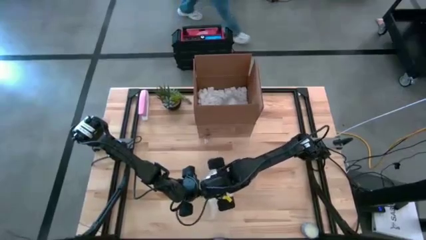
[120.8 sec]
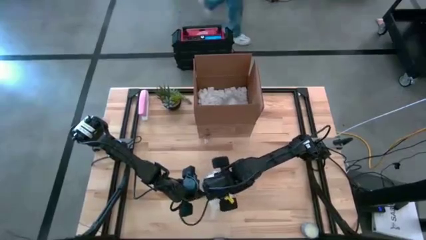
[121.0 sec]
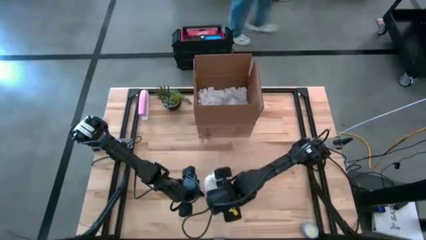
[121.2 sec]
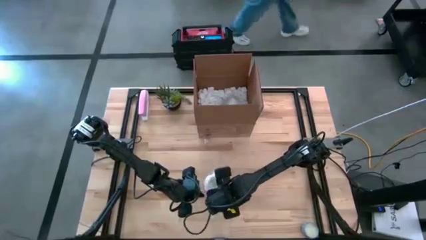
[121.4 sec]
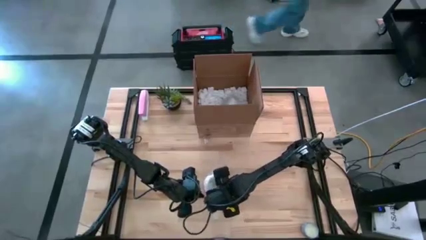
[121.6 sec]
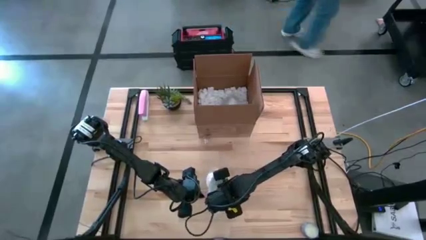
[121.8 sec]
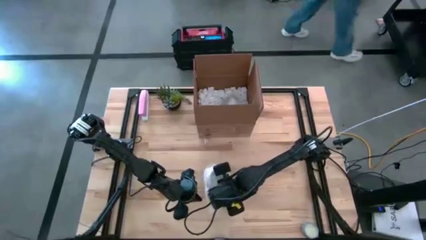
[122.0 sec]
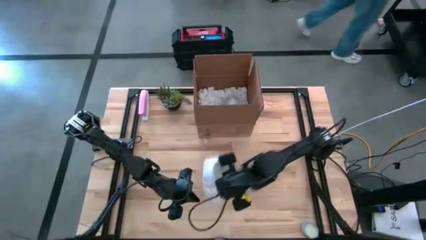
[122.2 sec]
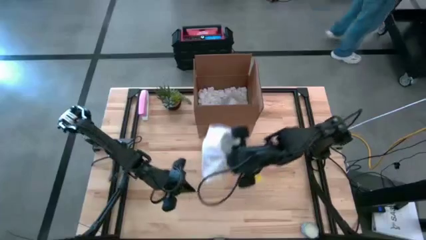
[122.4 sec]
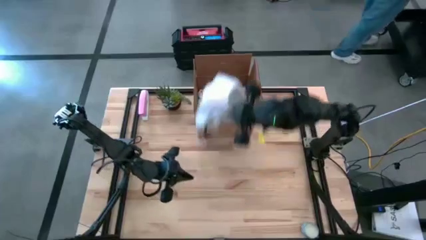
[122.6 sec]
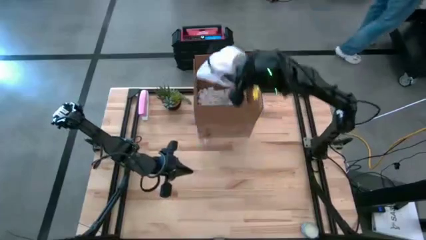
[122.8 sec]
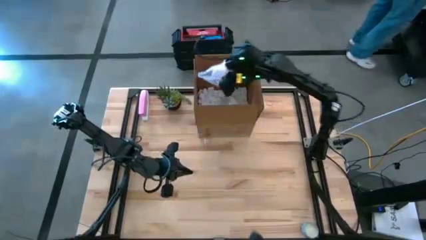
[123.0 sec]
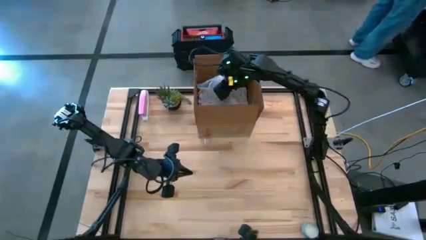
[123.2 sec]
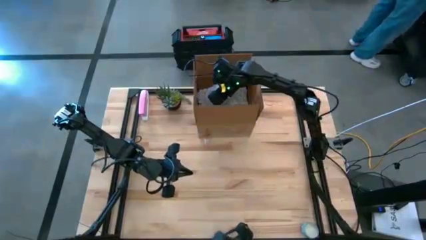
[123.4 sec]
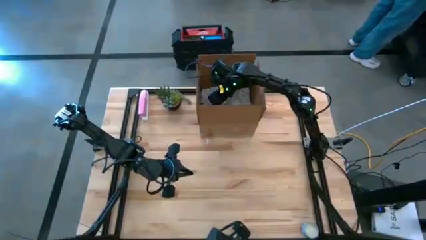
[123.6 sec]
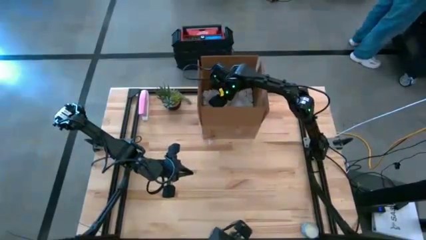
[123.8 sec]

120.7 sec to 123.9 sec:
Task: wrap mug
Put the wrapped yellow mug into the box

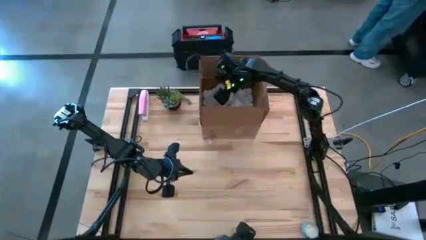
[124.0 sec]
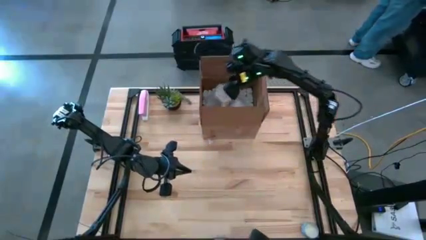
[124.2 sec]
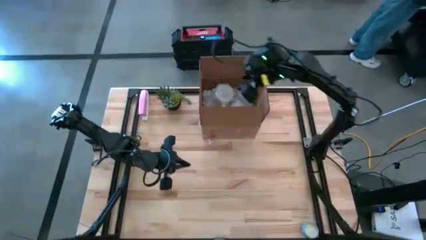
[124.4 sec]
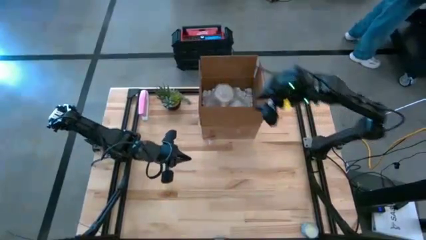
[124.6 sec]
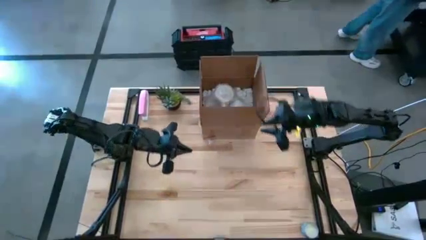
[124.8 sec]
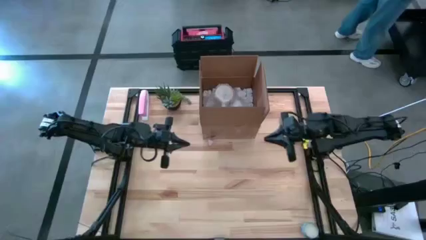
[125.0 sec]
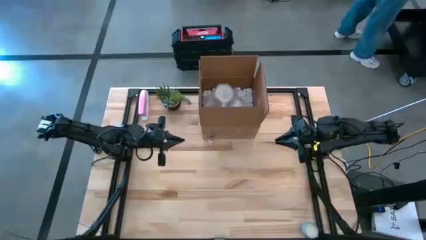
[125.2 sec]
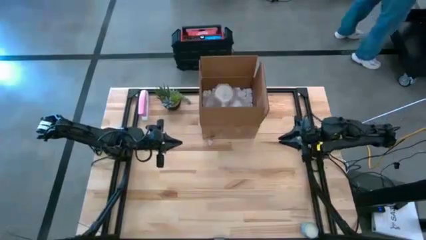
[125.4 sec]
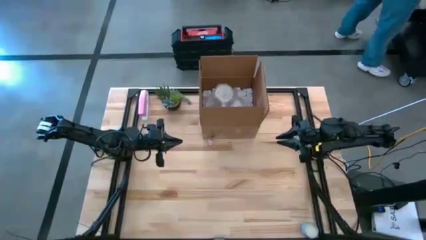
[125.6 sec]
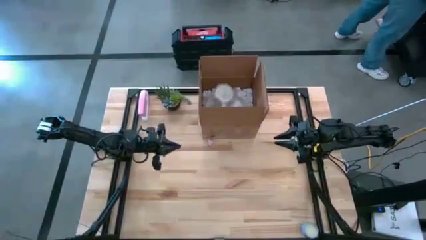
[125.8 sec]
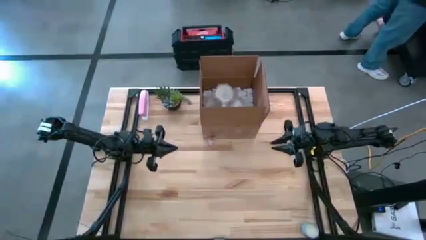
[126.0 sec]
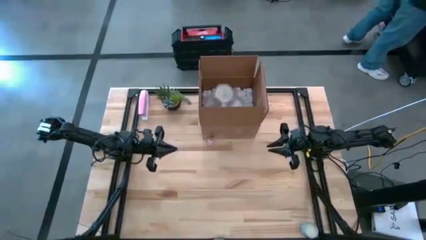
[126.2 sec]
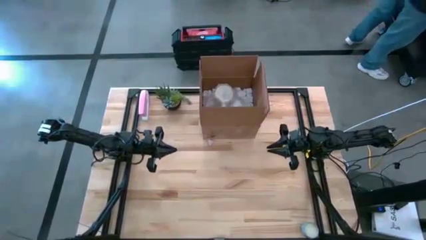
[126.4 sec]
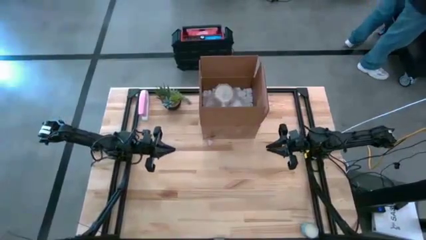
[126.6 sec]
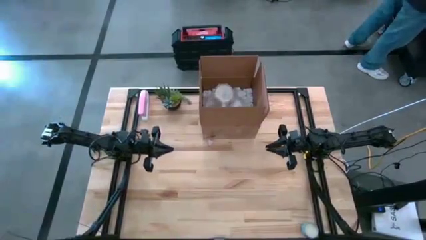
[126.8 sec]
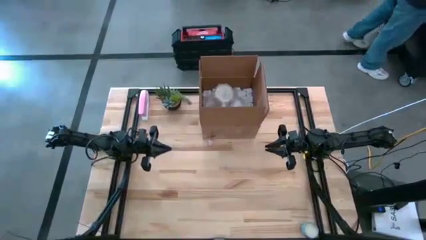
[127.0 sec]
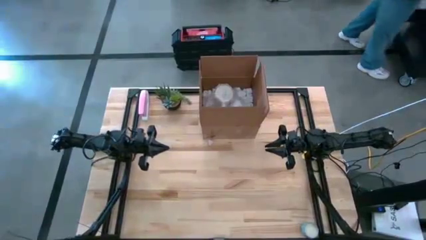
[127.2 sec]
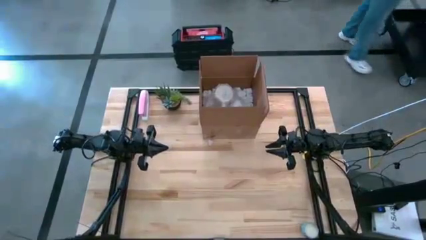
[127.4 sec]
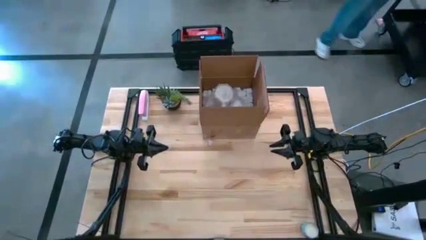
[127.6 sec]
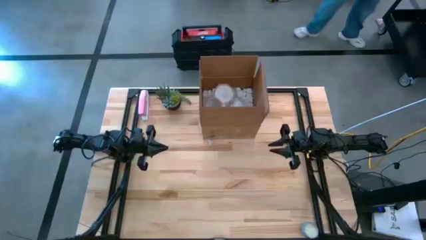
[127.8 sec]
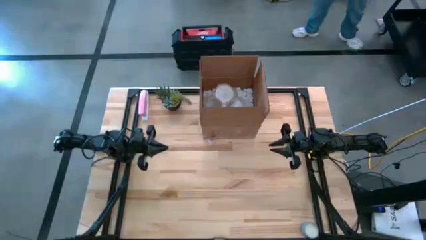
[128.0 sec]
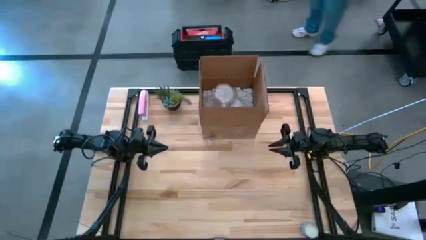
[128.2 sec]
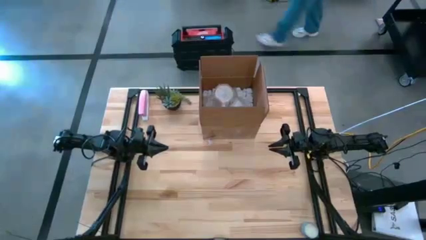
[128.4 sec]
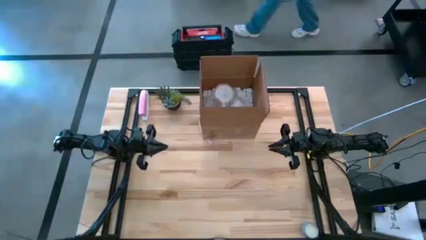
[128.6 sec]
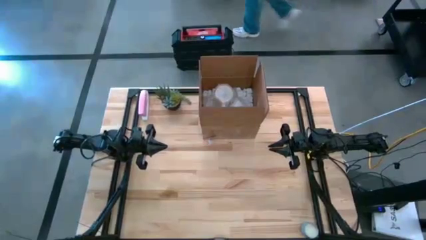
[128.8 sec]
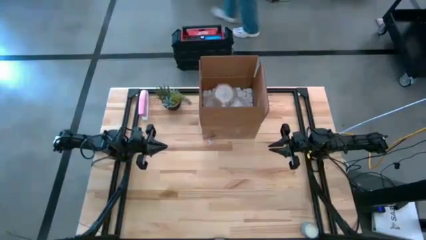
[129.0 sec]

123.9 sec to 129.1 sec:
Return to Home Position
